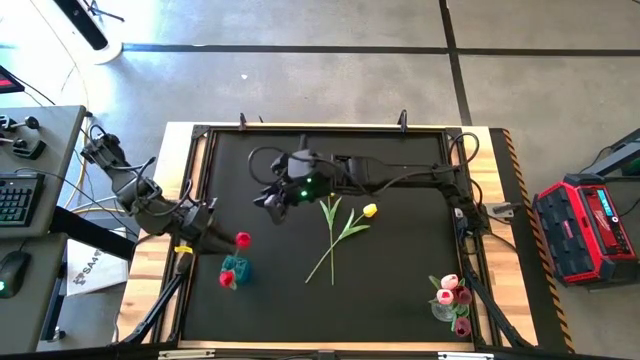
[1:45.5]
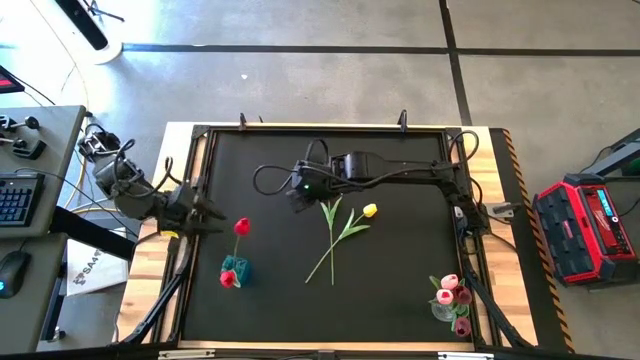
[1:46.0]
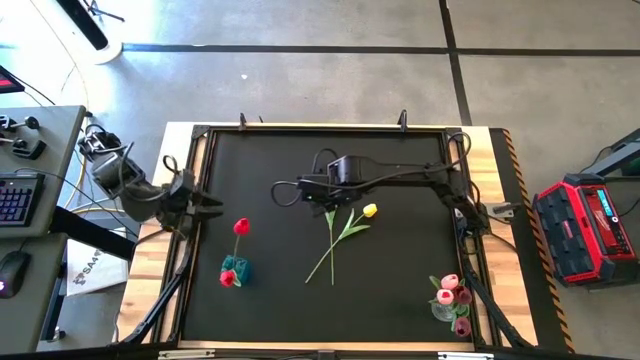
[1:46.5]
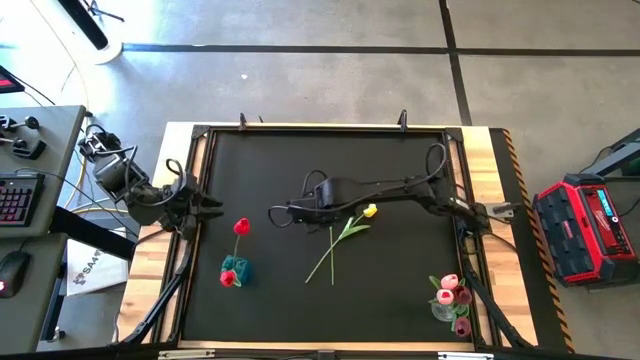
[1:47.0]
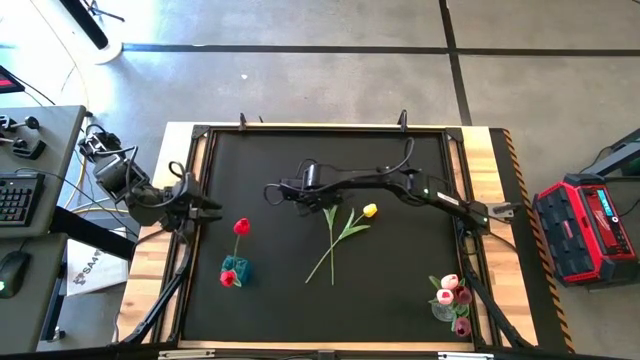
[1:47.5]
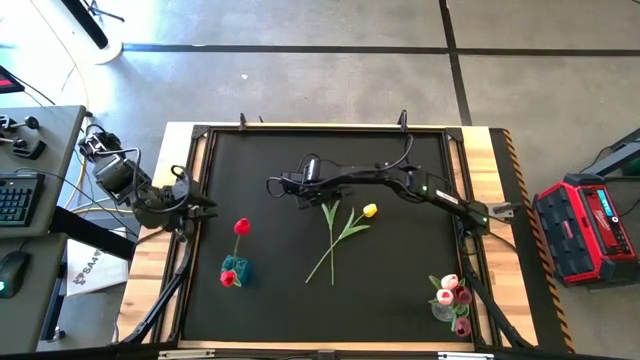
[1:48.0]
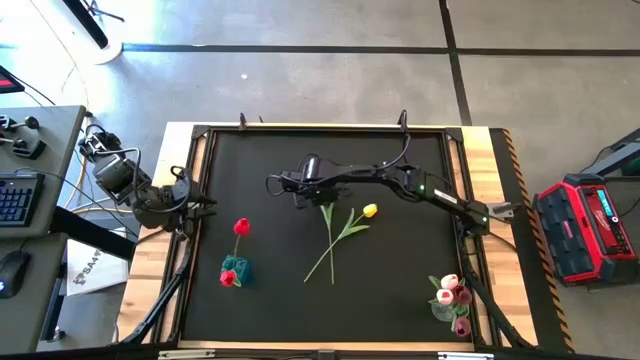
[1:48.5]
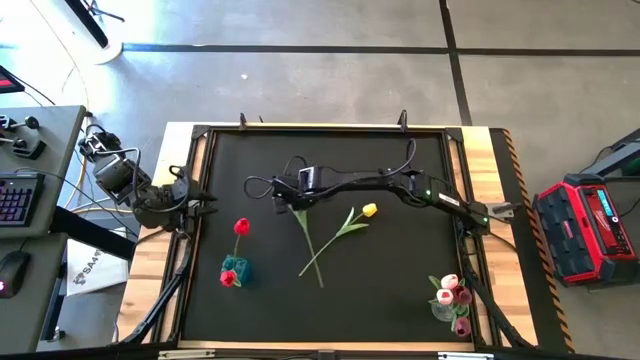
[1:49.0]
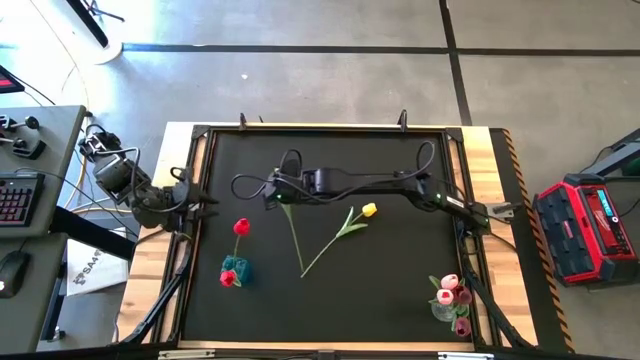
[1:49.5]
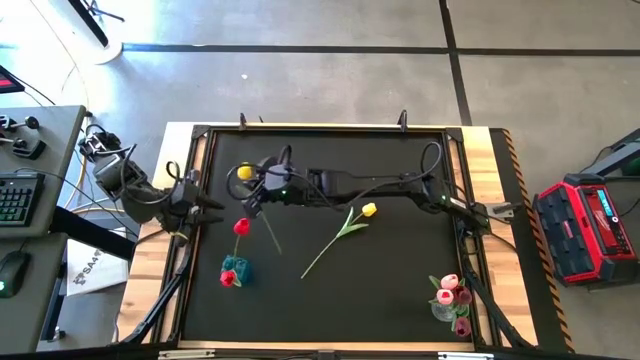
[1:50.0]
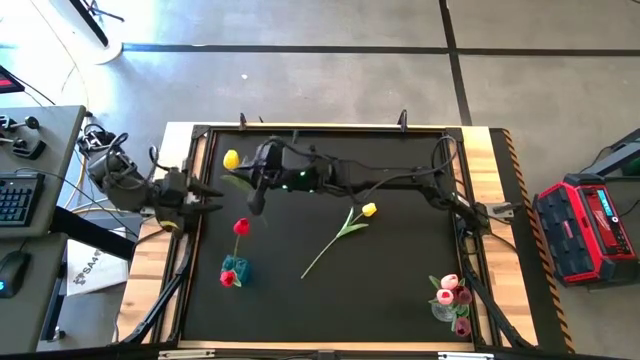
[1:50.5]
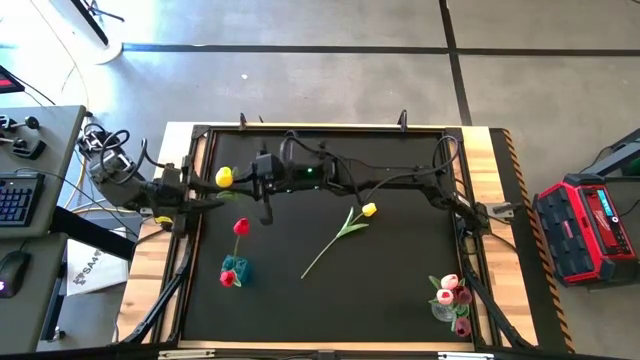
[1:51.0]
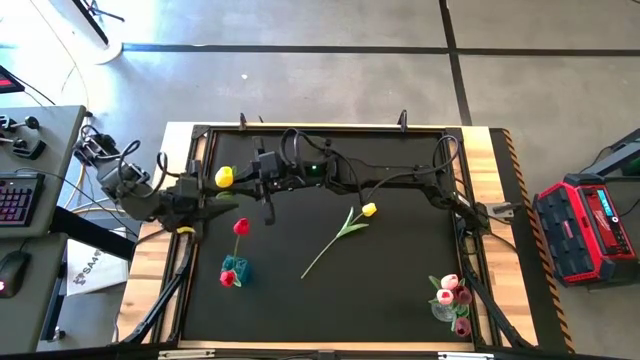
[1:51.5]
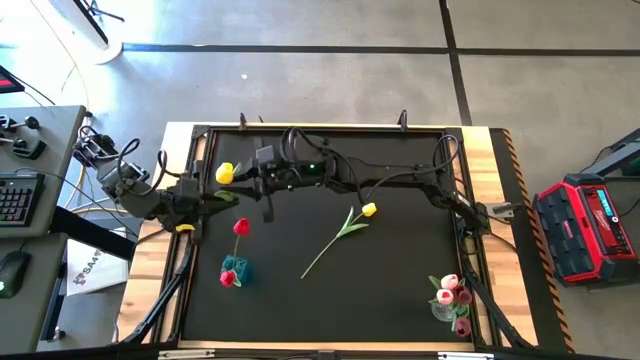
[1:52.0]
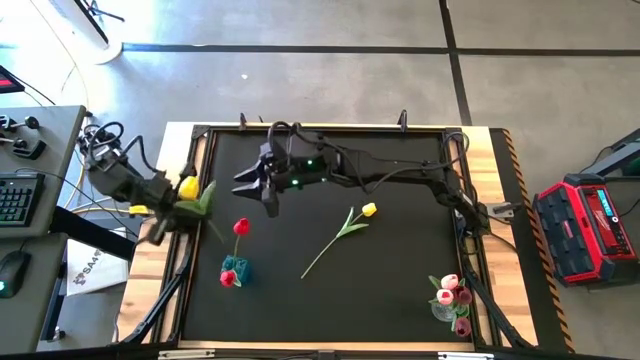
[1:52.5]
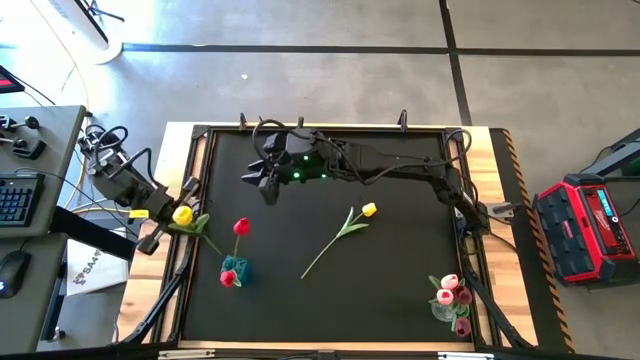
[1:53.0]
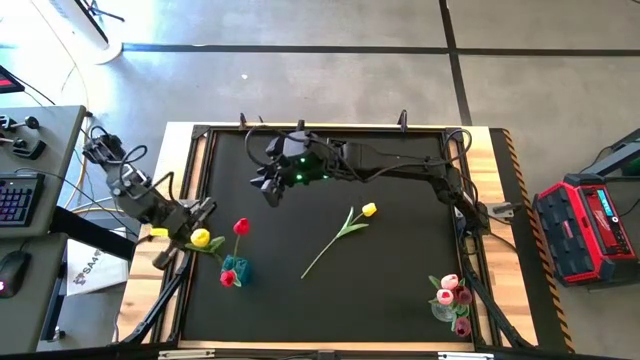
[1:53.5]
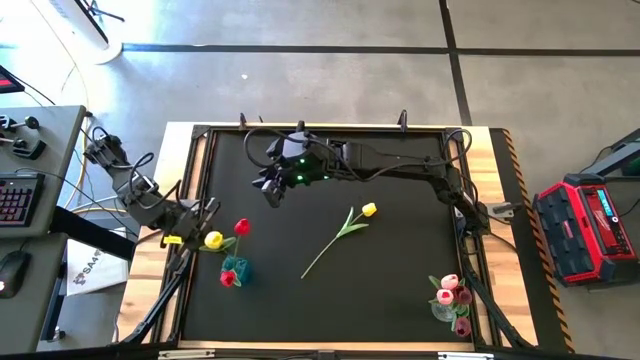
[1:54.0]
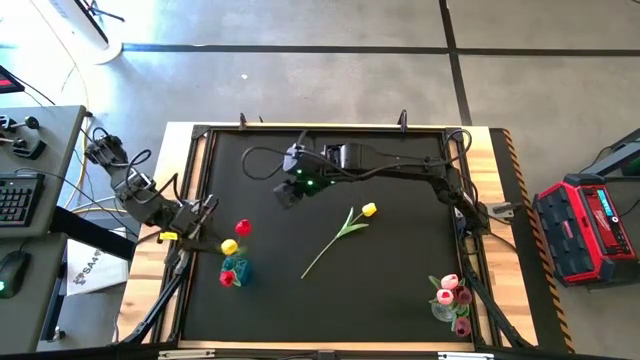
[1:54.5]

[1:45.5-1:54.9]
Task: Sort flowers into vase by color
Put the left yellow flower into the blue vase

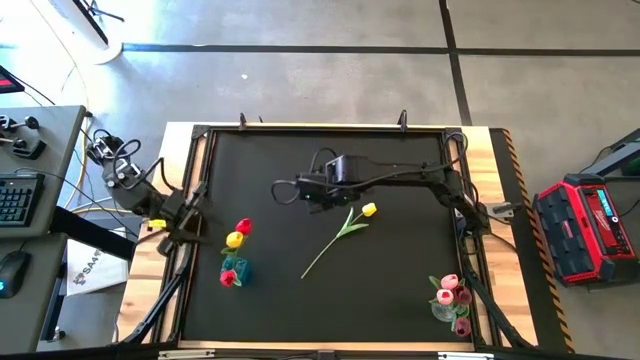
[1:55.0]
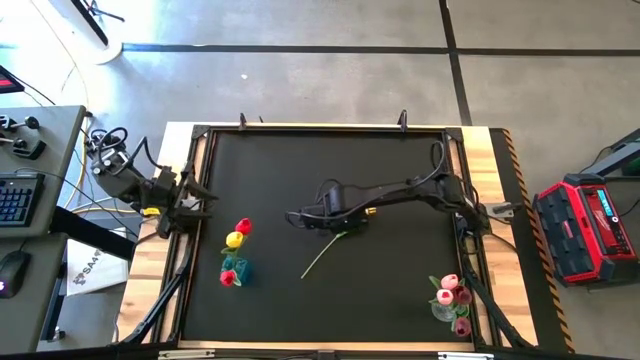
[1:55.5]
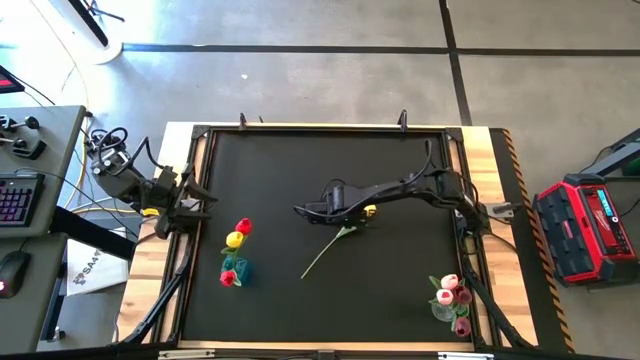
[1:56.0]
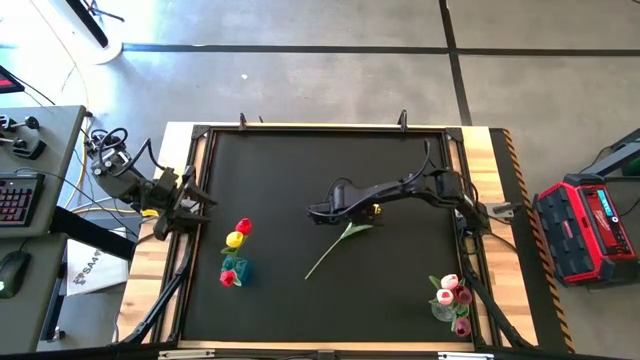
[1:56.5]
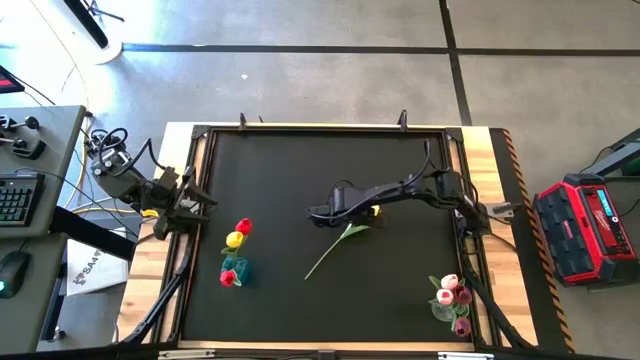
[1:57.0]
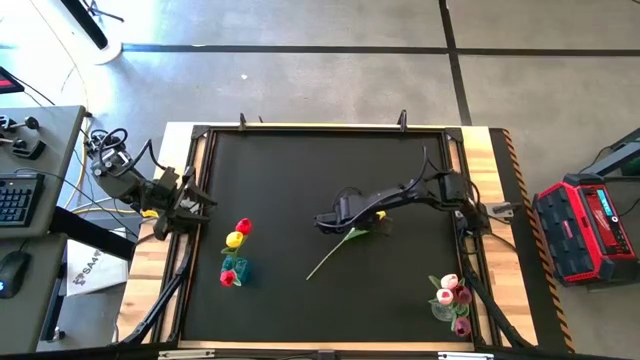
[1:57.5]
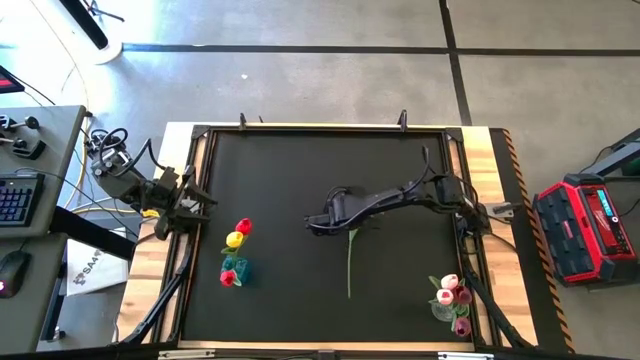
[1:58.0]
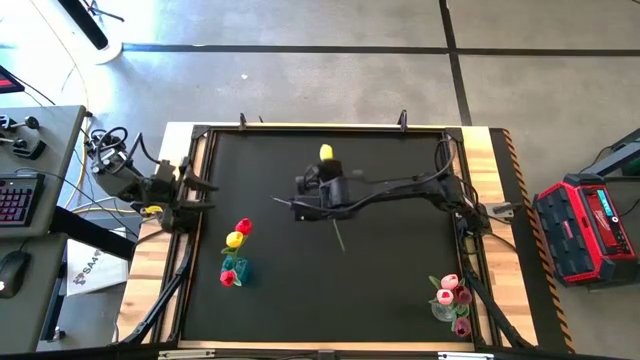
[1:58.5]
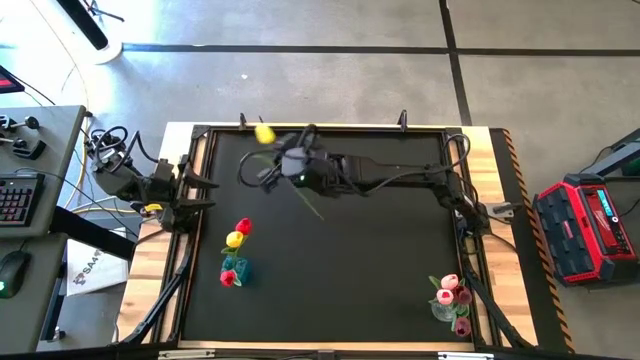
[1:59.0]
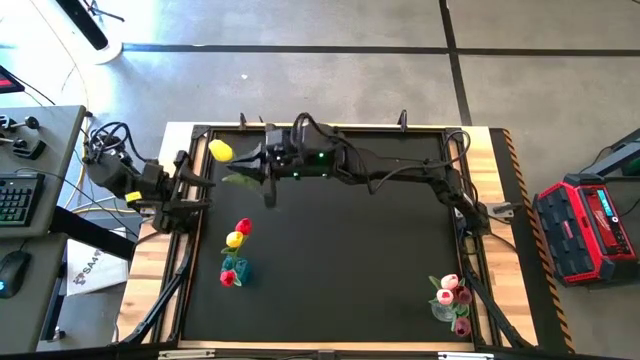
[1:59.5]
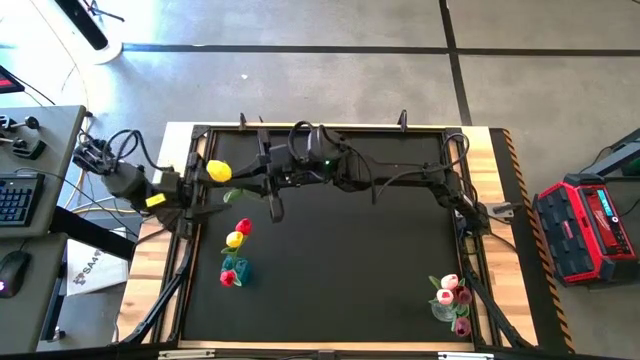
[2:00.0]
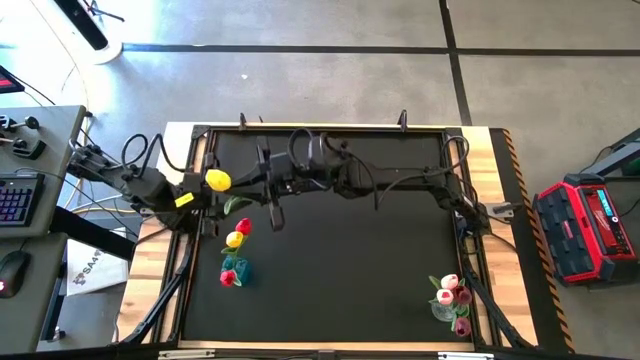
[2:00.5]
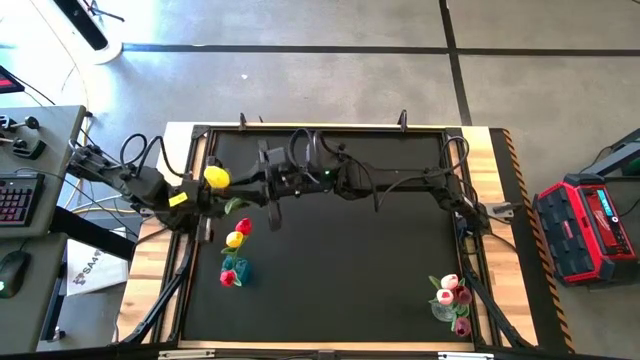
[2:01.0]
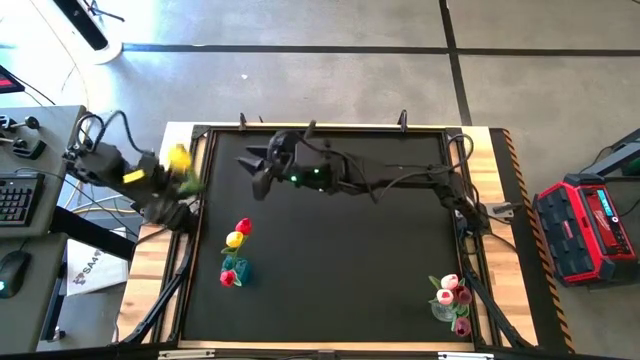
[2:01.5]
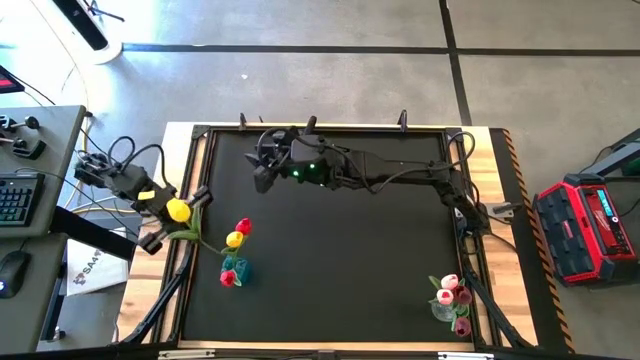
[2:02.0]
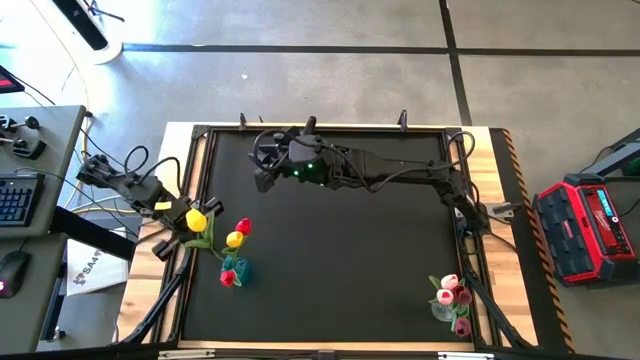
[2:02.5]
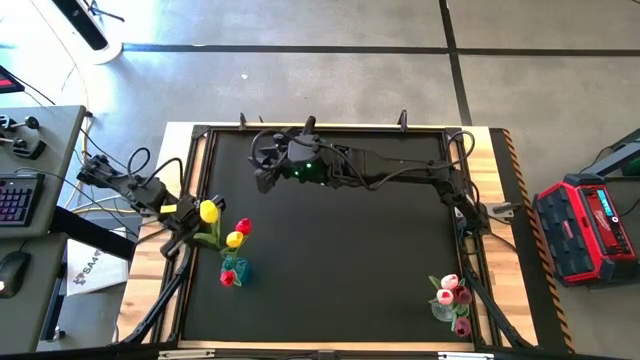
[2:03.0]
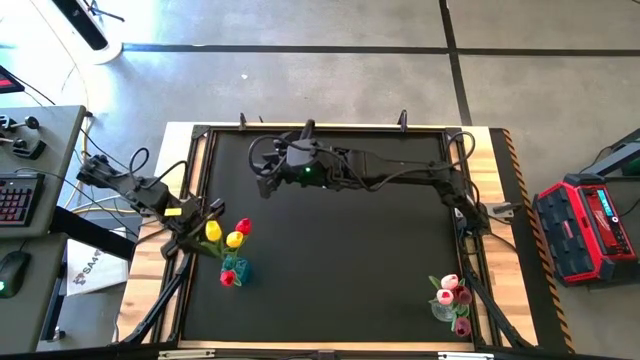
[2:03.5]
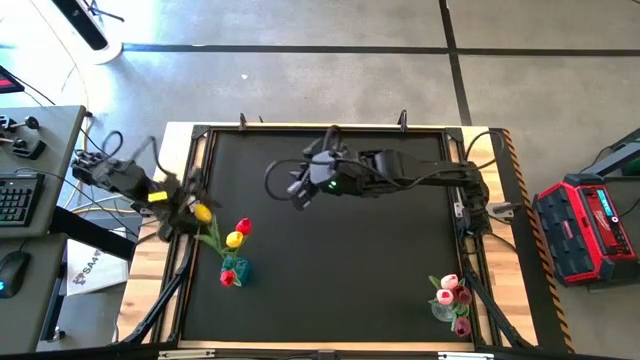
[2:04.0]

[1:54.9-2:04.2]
Put the yellow flower into the blue vase

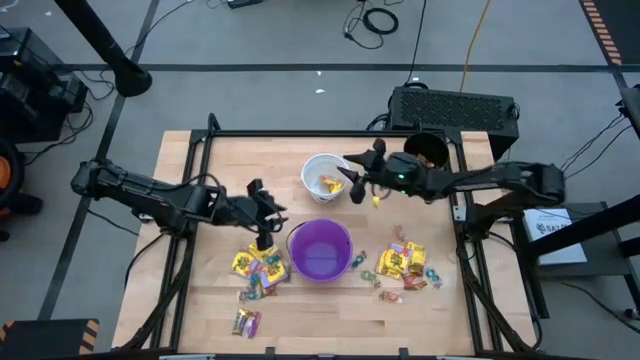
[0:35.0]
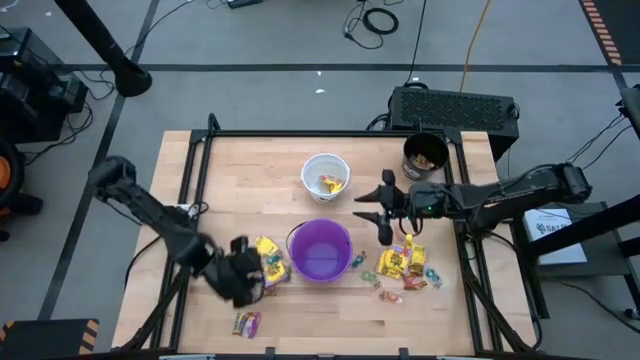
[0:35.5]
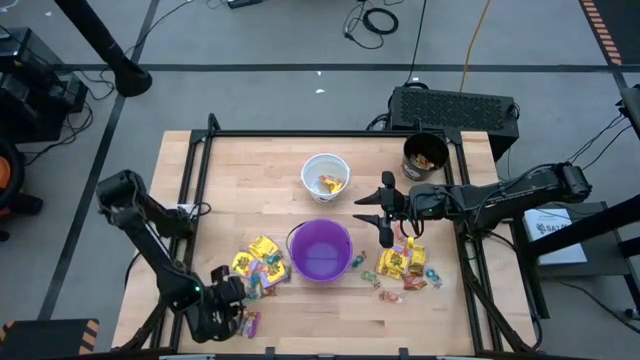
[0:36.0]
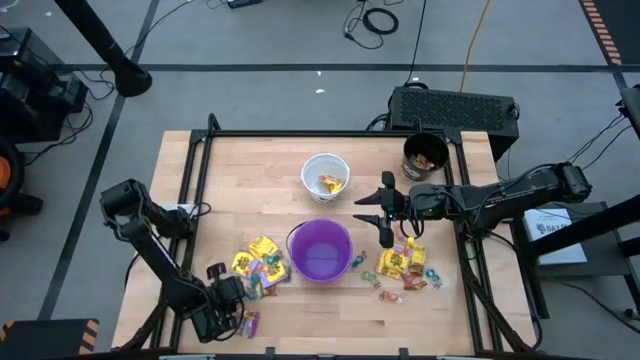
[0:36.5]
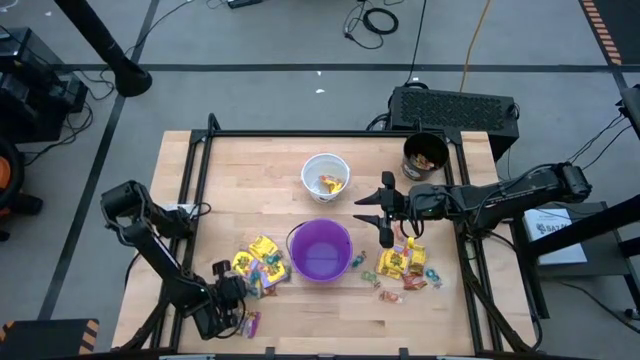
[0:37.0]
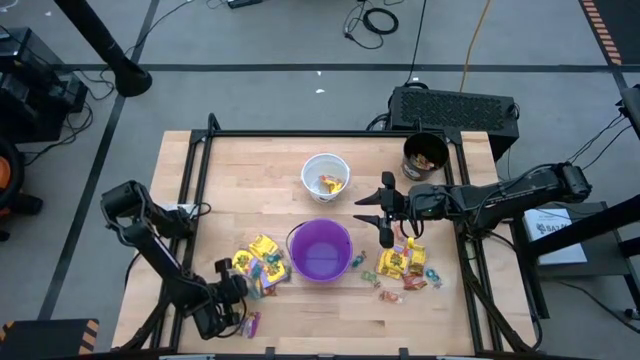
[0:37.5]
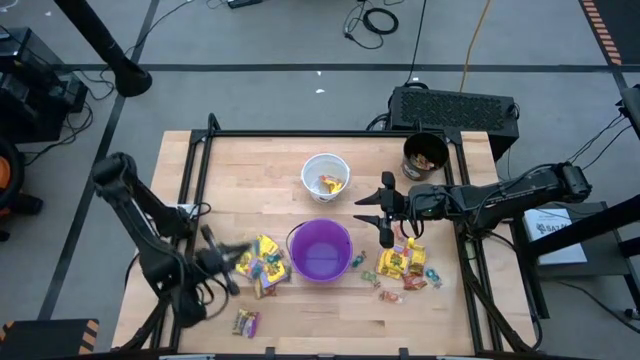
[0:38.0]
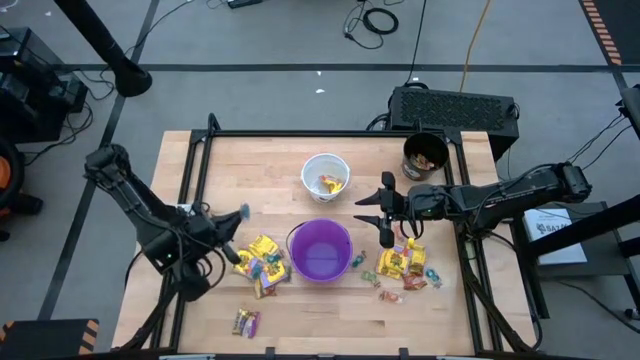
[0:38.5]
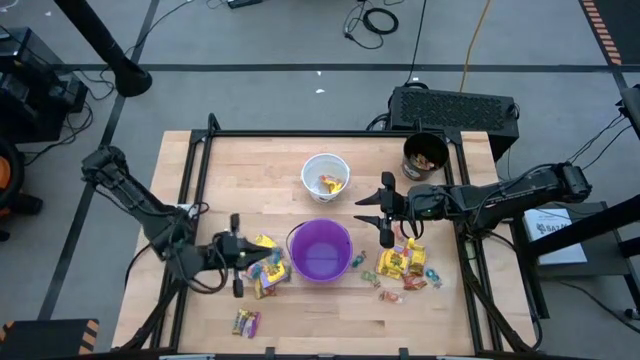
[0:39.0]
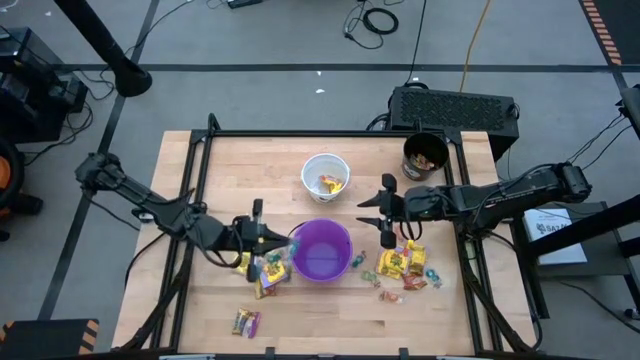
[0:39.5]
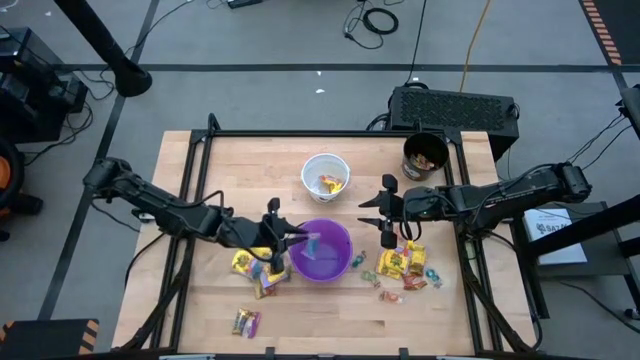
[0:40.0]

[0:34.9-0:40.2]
Task: Sort candy by brand, put in halloween buckets
Put the blue gummy into the violet bucket
